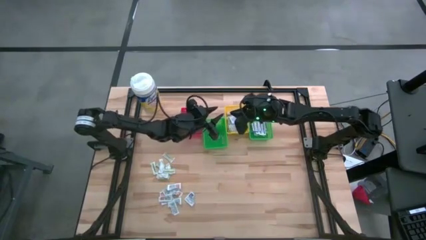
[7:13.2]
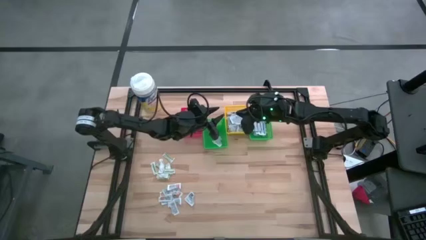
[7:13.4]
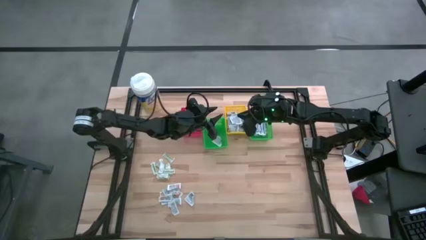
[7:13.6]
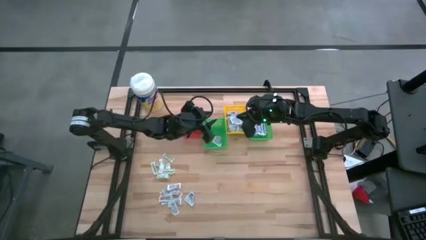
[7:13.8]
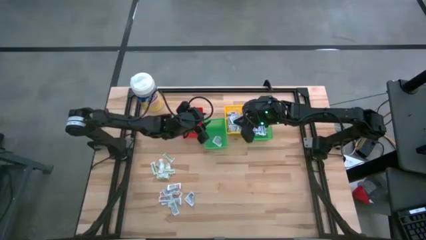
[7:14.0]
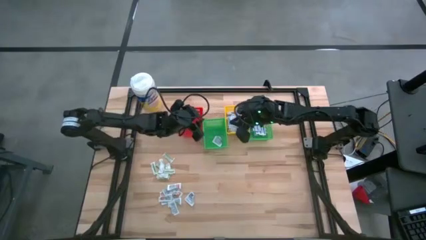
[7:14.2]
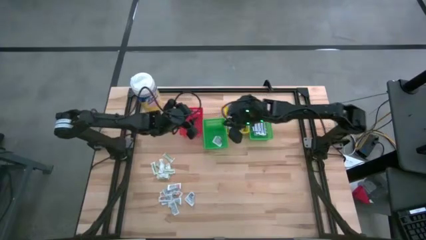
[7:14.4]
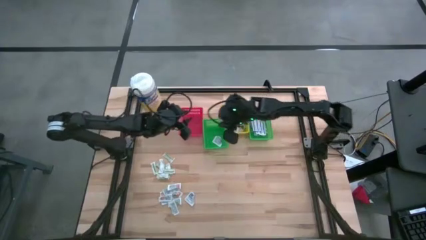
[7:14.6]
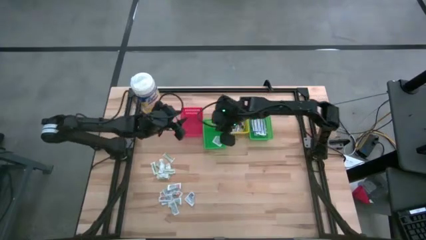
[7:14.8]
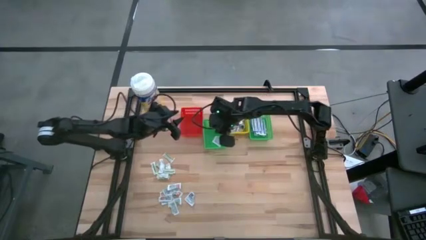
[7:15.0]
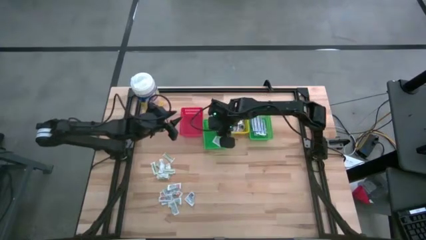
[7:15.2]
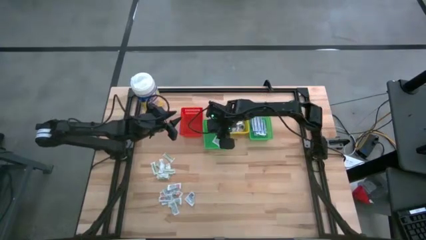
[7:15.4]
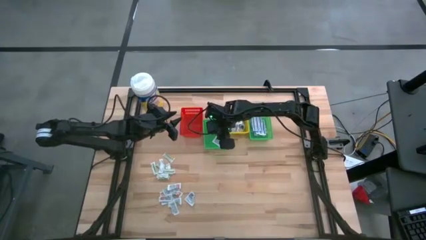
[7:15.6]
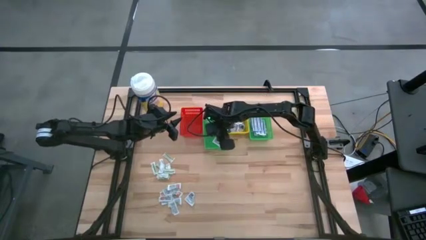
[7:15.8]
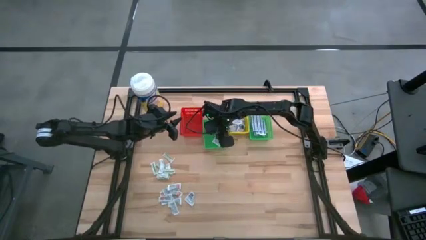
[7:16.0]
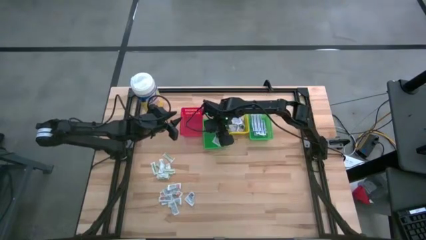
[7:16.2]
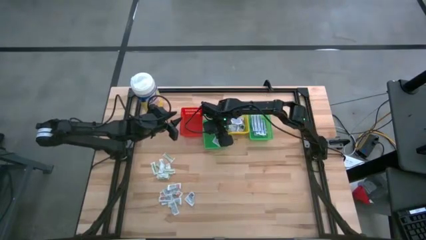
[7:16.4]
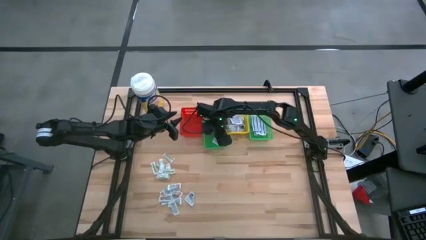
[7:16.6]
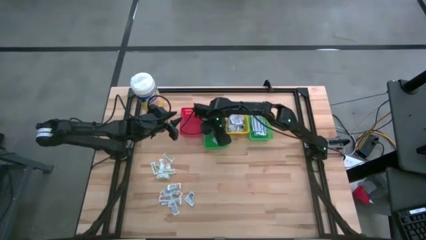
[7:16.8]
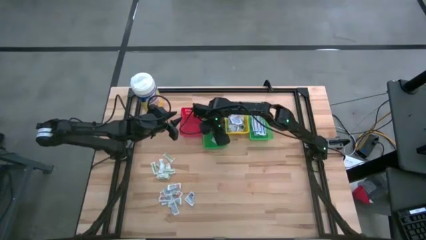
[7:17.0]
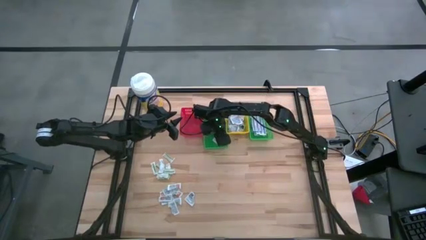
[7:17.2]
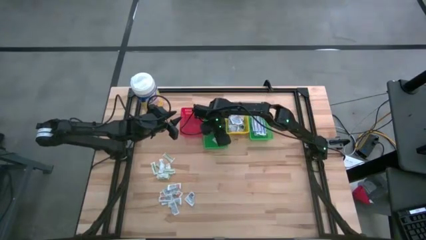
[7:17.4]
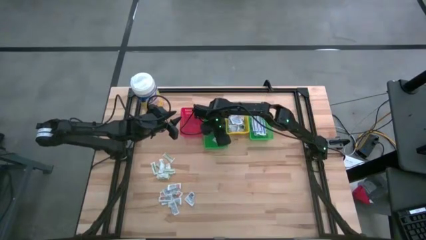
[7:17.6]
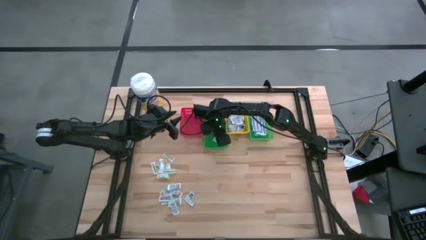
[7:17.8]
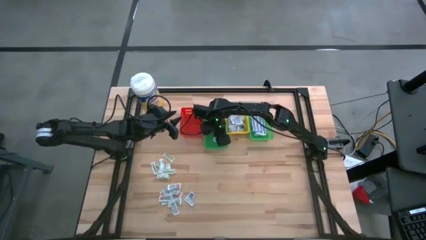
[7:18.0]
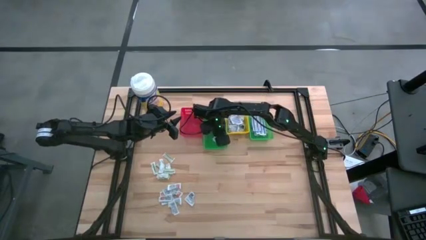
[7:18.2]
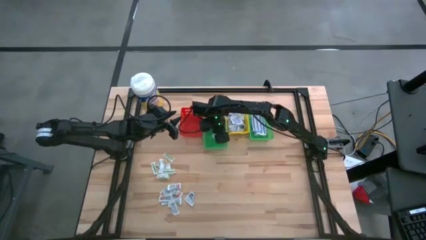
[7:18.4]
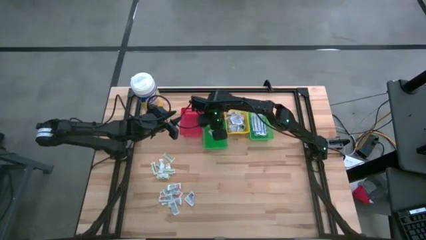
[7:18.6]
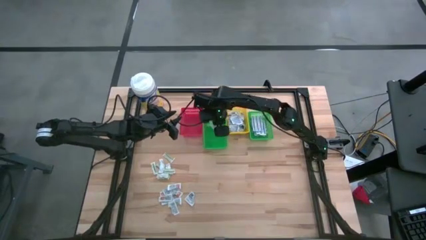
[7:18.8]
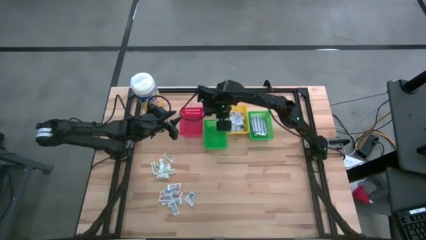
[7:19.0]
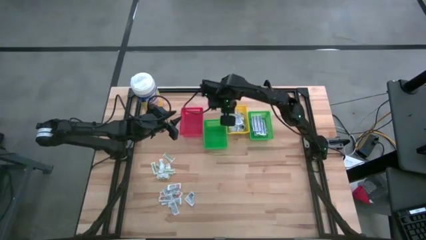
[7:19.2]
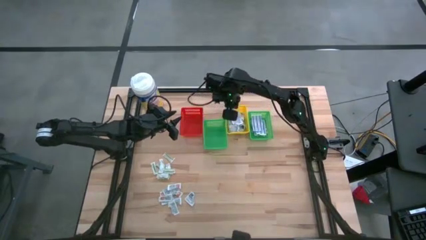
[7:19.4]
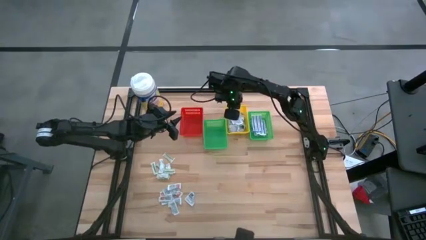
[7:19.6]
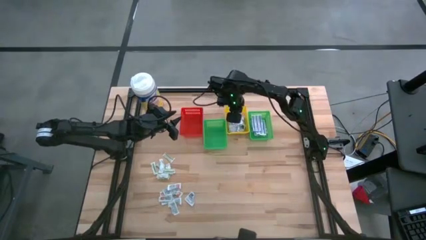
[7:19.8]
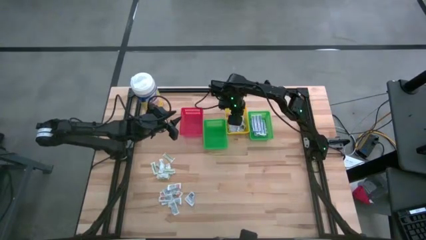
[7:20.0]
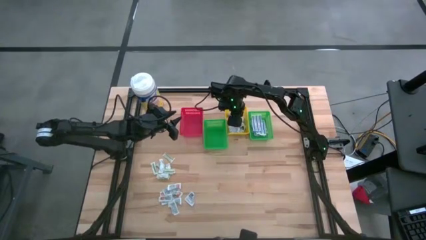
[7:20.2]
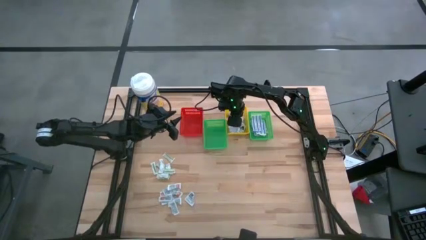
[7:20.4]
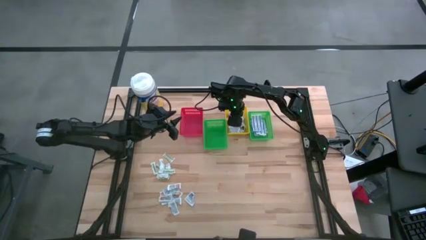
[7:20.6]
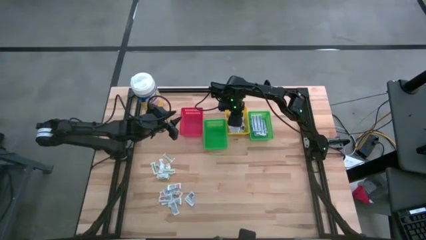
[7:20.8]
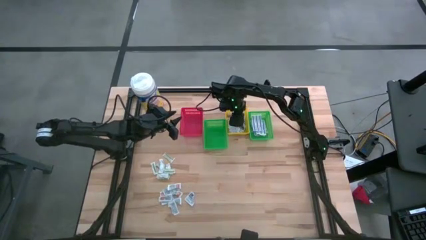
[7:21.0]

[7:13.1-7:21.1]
Task: Pick & Place First Aid Supplies
Put the alcohol pad into the yellow basket

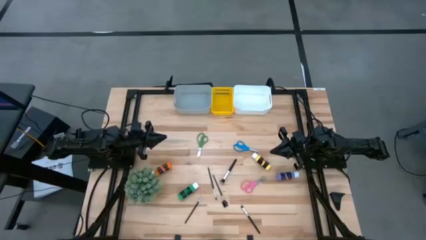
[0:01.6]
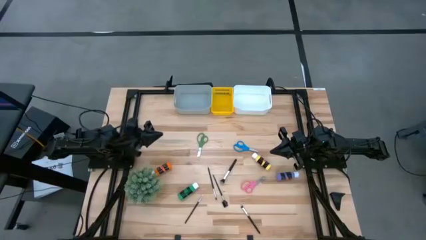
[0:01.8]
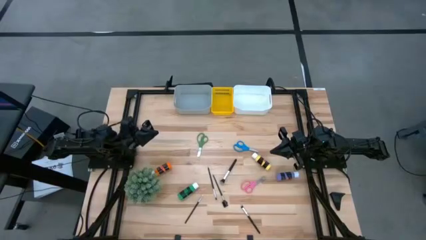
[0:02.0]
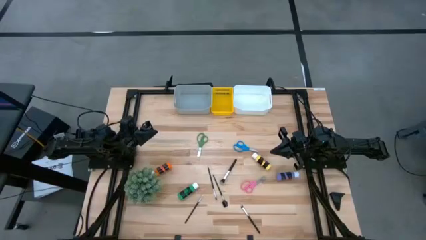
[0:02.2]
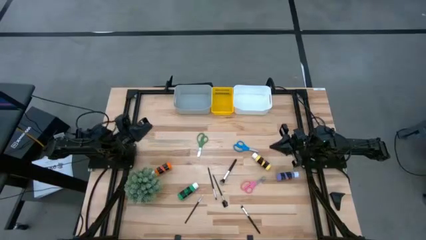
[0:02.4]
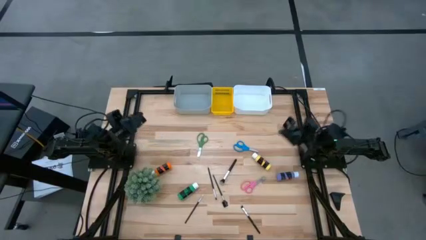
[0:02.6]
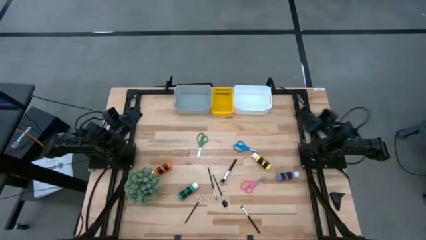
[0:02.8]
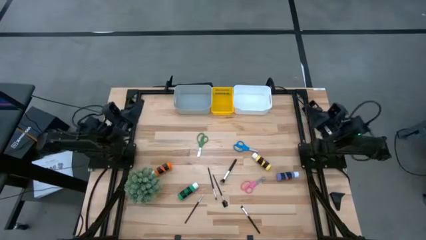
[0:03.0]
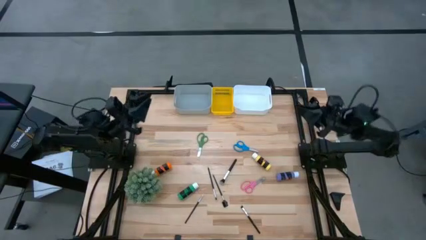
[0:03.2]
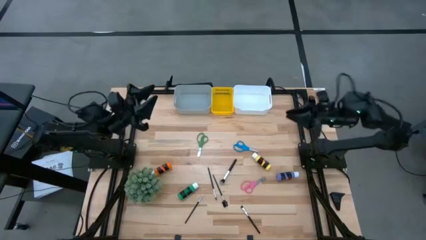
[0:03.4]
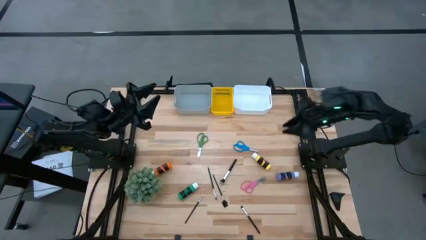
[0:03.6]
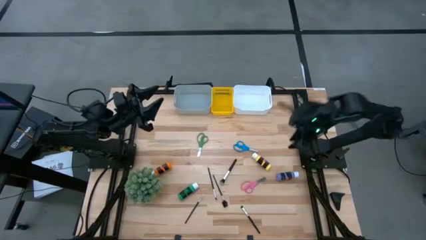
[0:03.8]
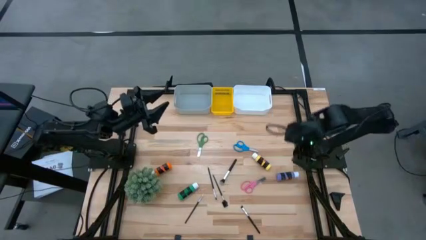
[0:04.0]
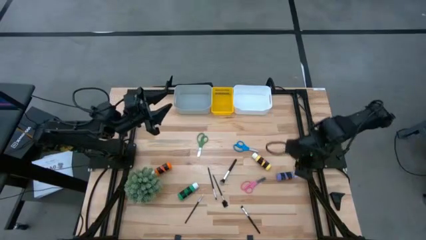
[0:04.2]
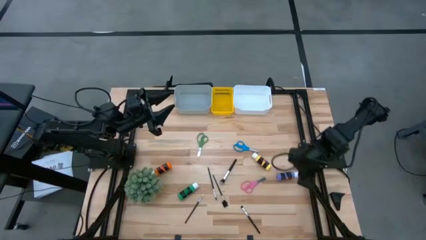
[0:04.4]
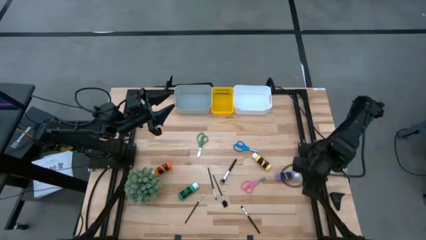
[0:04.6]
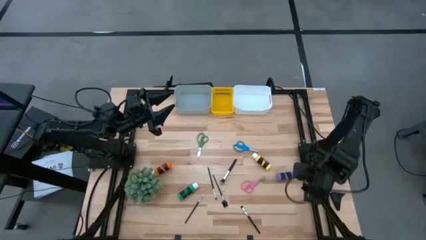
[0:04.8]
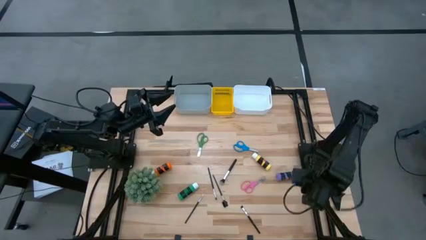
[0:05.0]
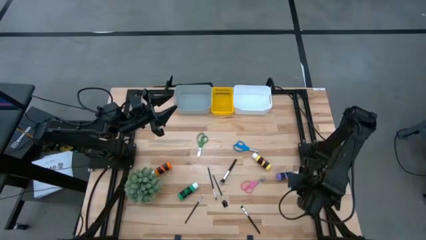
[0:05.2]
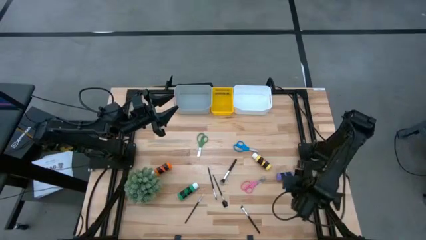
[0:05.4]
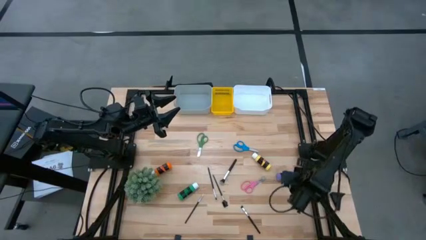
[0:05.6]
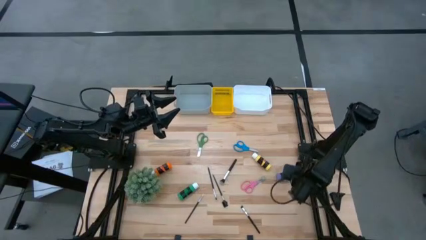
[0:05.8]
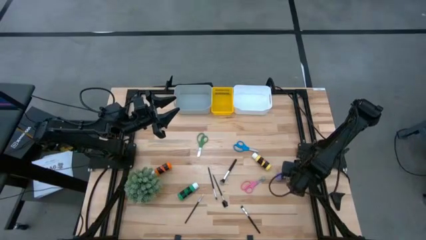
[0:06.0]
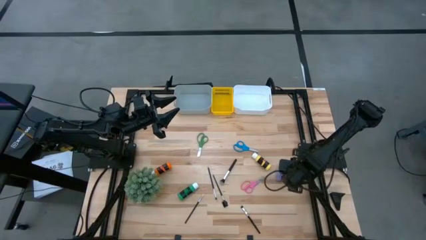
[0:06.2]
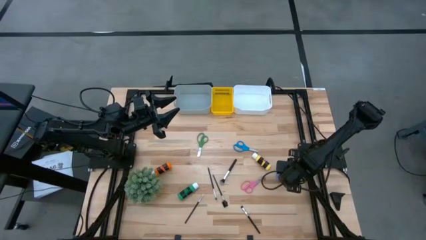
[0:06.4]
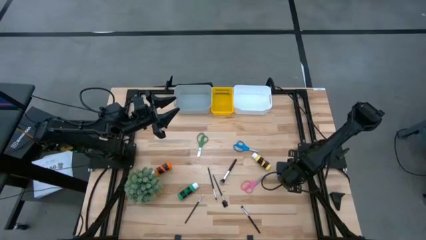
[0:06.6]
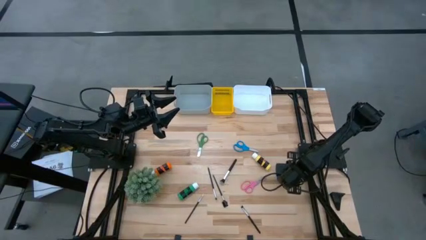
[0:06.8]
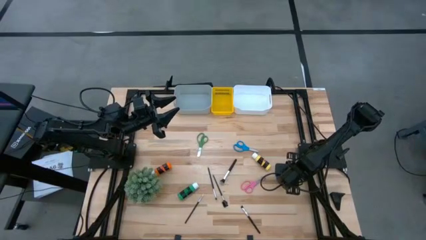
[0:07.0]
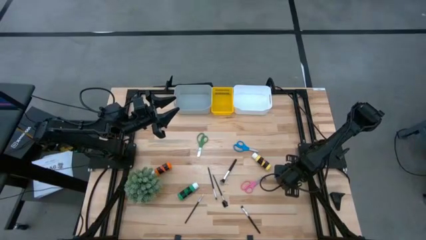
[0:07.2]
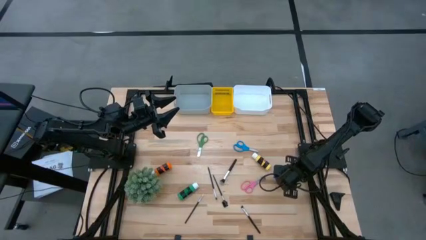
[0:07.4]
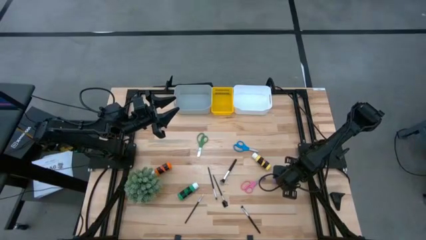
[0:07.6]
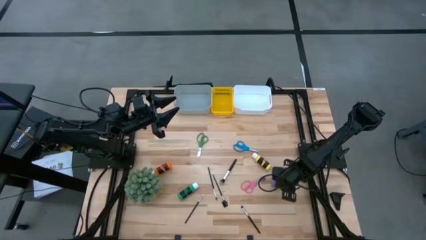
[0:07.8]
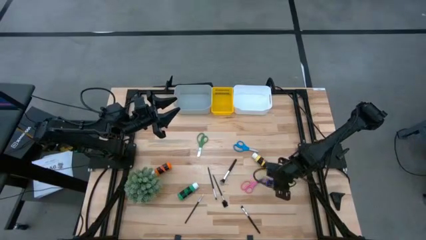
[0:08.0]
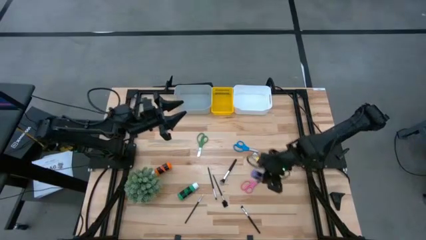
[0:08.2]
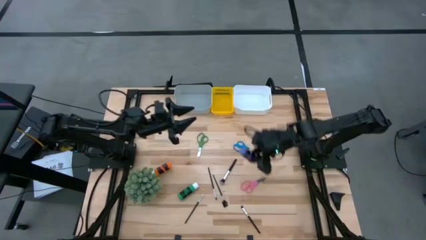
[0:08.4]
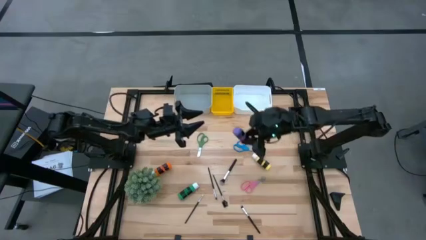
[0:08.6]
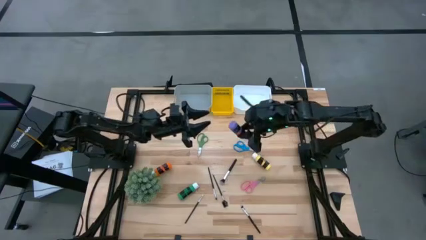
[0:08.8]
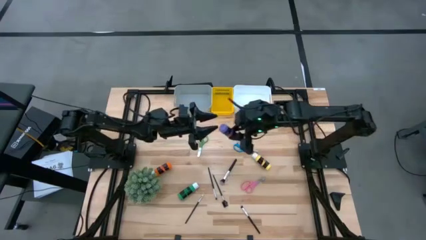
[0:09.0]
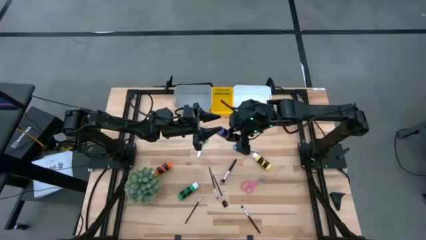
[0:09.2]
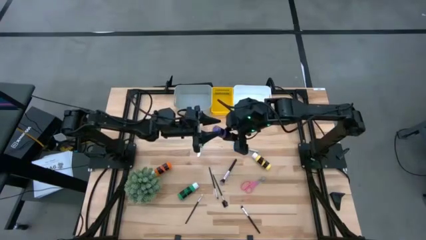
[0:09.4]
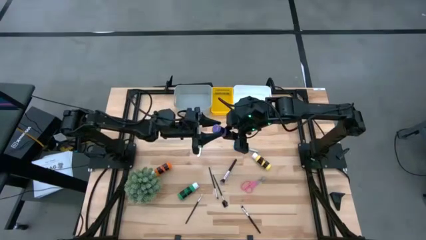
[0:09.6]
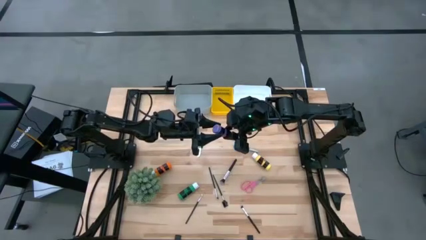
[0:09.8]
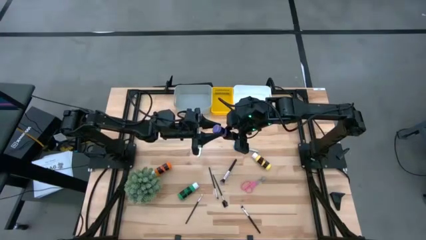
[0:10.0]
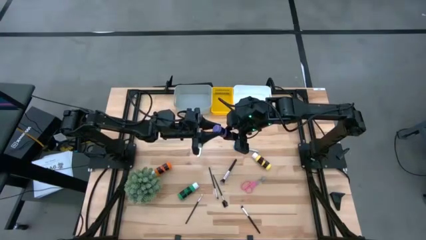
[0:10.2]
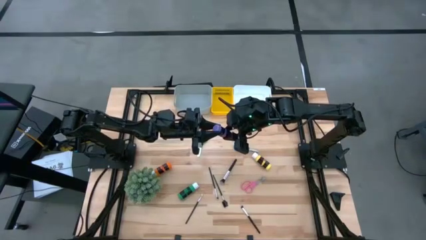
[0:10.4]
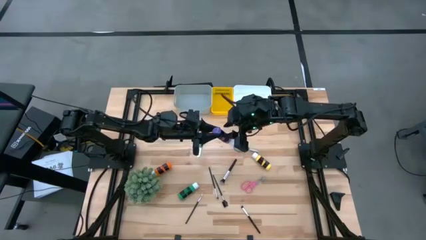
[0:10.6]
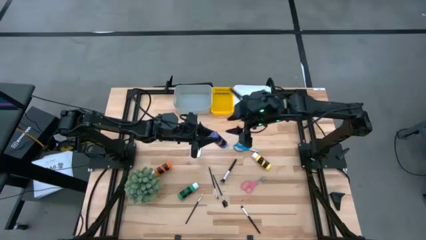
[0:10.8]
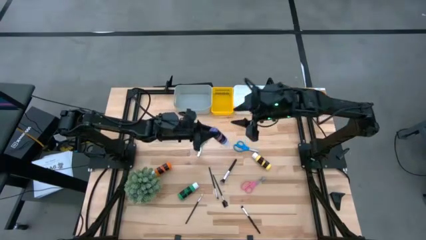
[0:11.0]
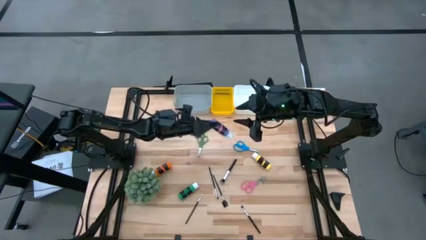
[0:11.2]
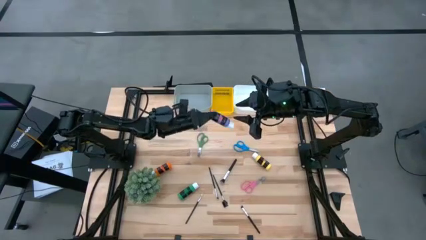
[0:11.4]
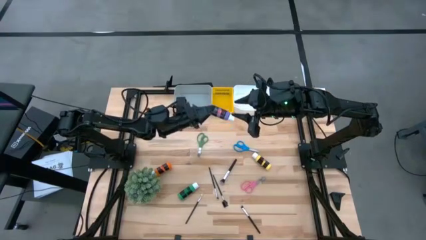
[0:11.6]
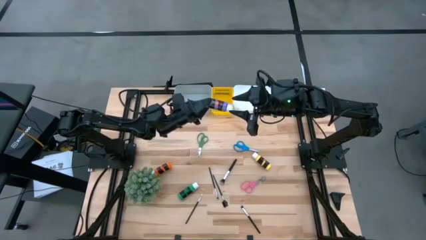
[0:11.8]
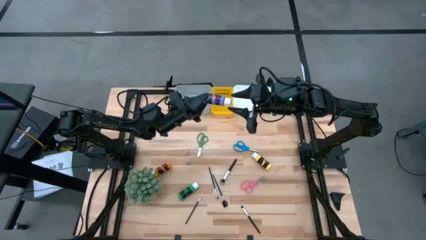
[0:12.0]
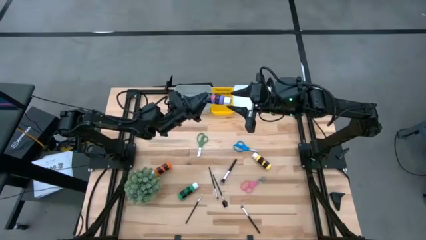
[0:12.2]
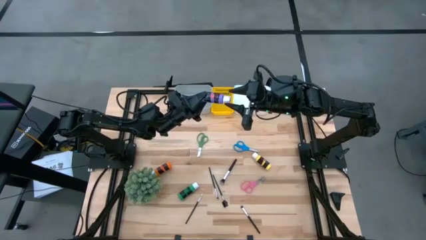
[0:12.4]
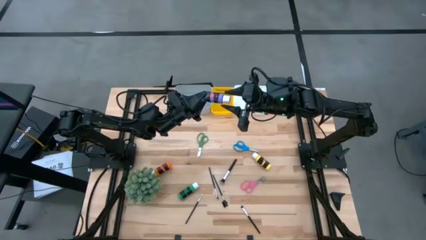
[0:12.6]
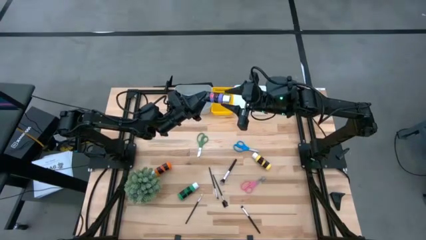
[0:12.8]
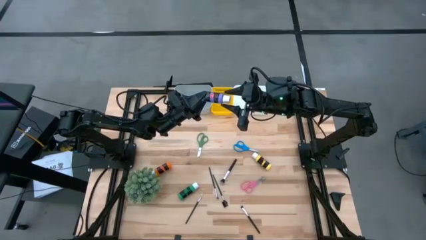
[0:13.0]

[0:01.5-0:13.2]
Task: Pick & Place Paint Supplies
Put the purple paint bottle into the yellow bin
